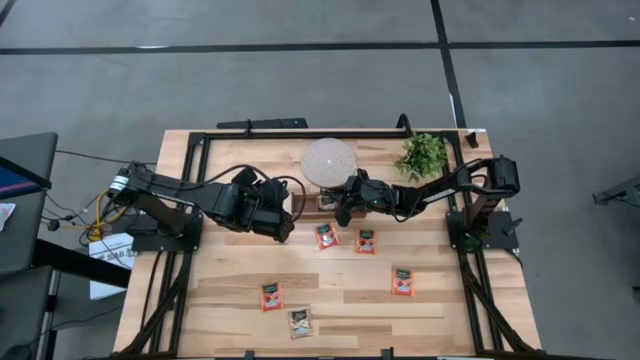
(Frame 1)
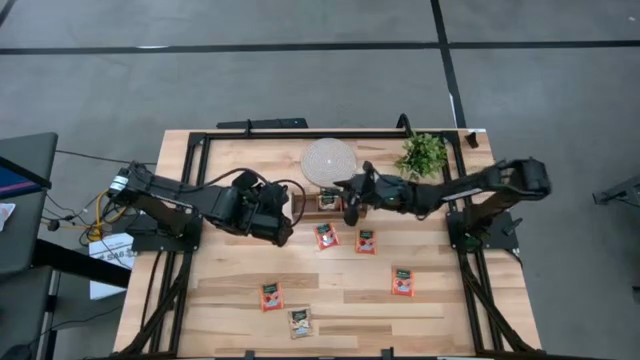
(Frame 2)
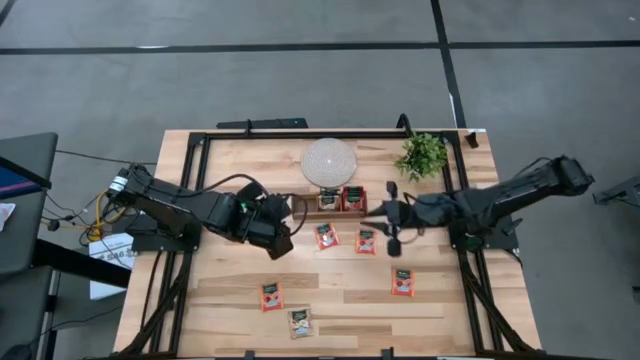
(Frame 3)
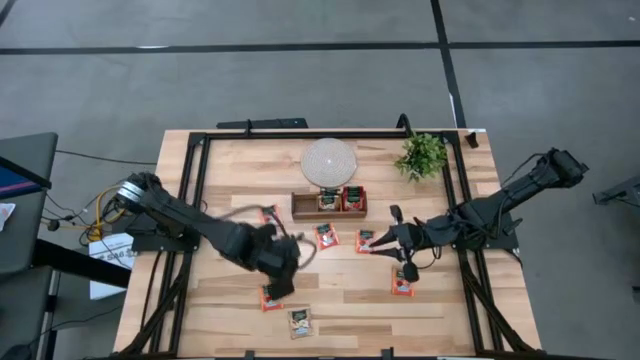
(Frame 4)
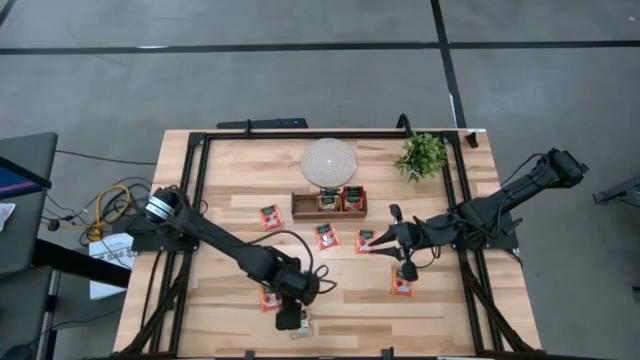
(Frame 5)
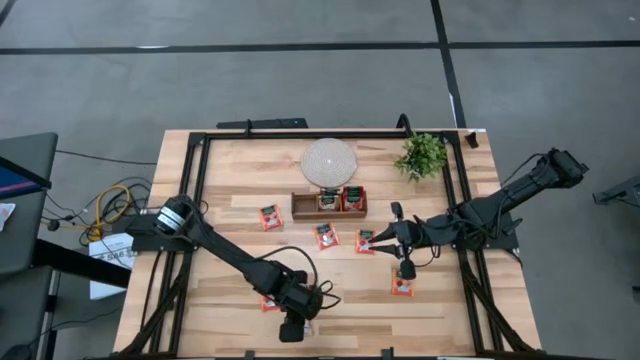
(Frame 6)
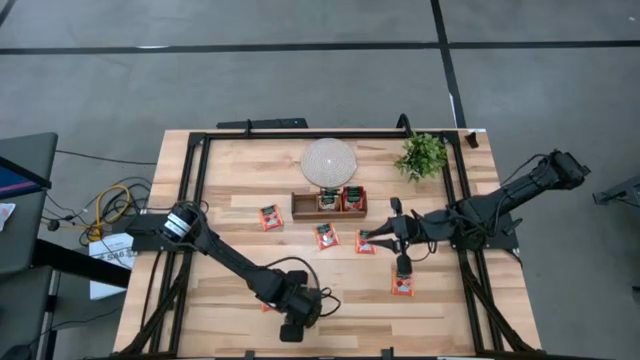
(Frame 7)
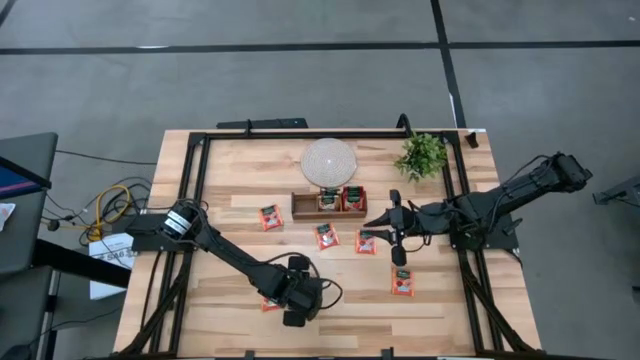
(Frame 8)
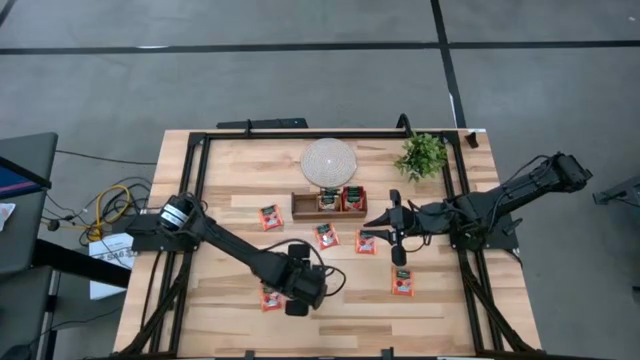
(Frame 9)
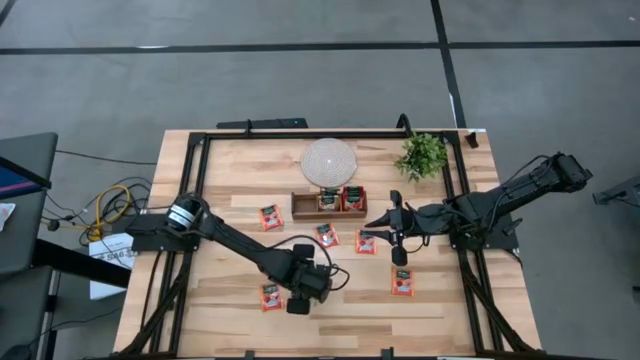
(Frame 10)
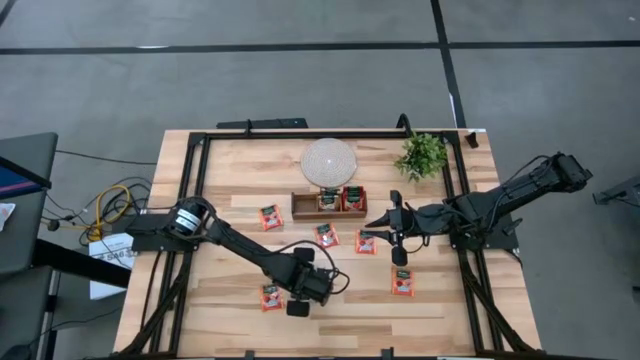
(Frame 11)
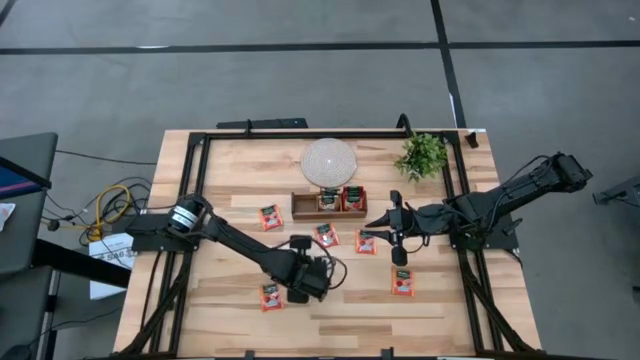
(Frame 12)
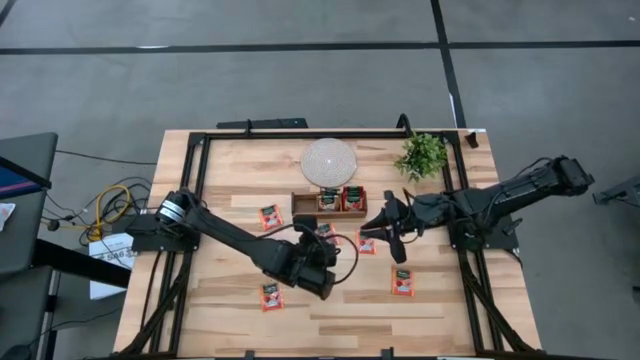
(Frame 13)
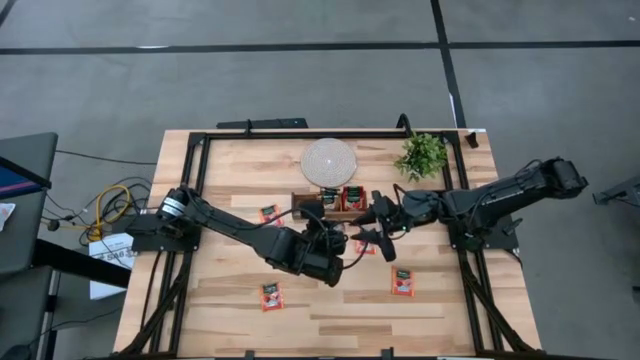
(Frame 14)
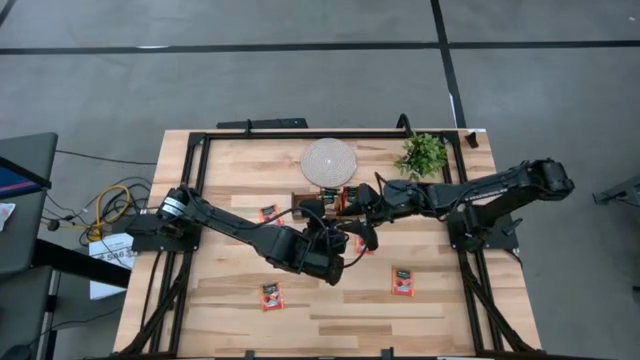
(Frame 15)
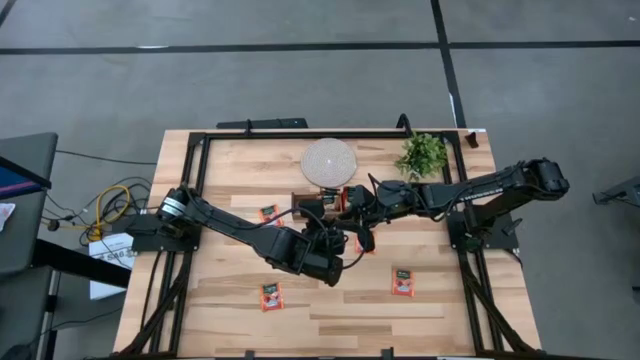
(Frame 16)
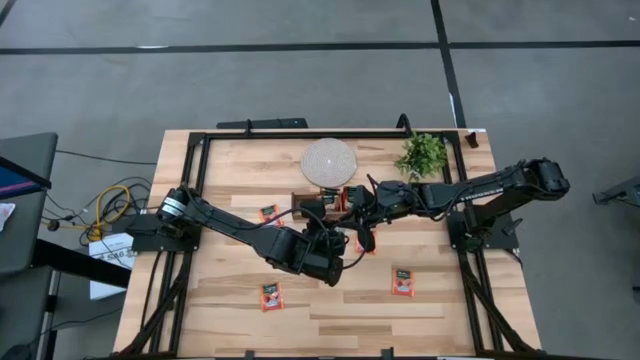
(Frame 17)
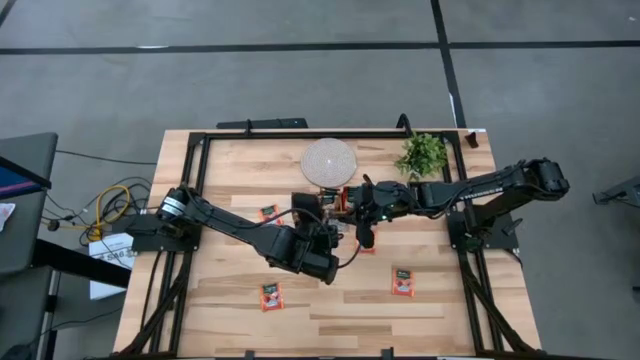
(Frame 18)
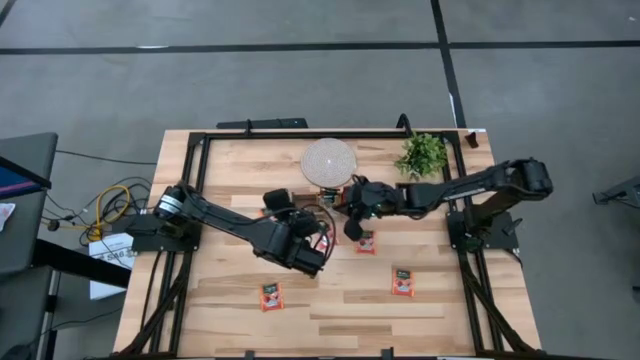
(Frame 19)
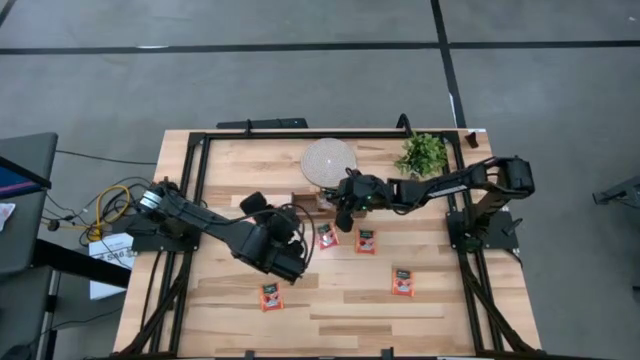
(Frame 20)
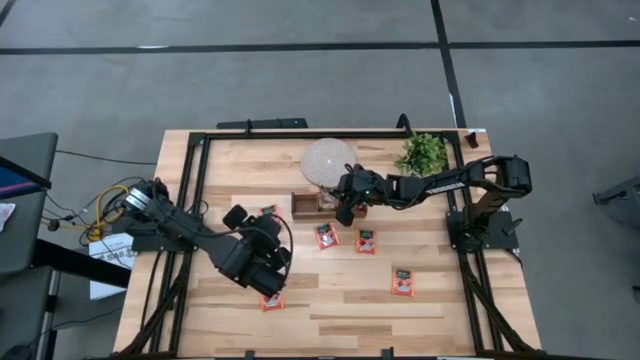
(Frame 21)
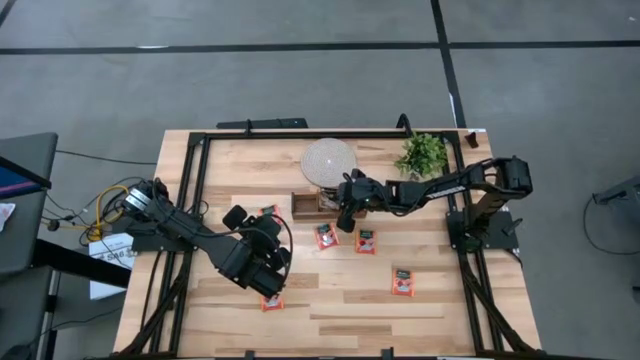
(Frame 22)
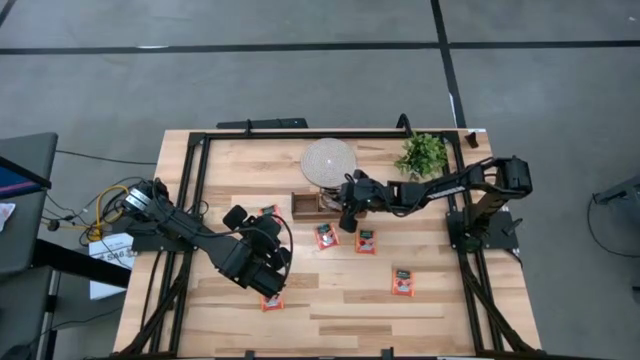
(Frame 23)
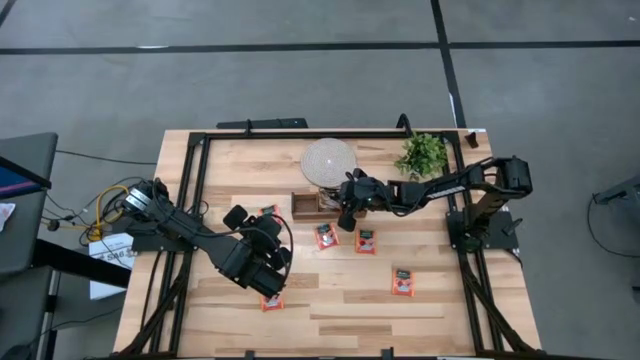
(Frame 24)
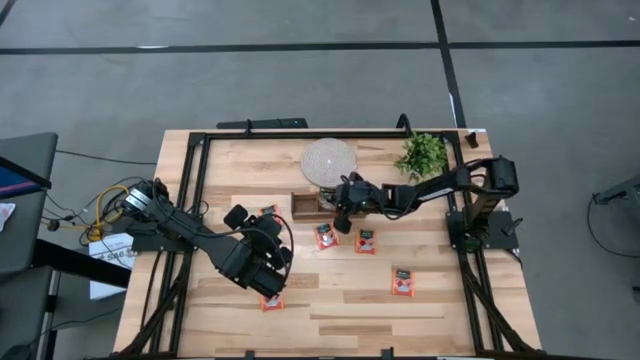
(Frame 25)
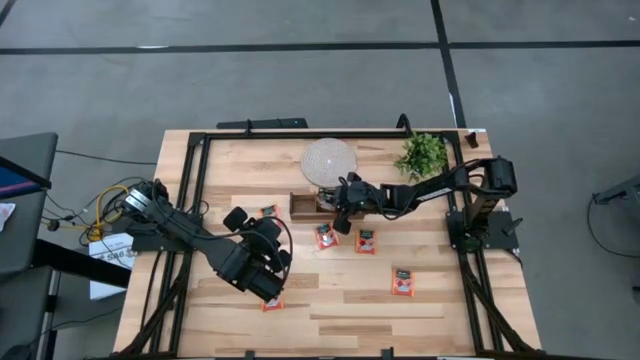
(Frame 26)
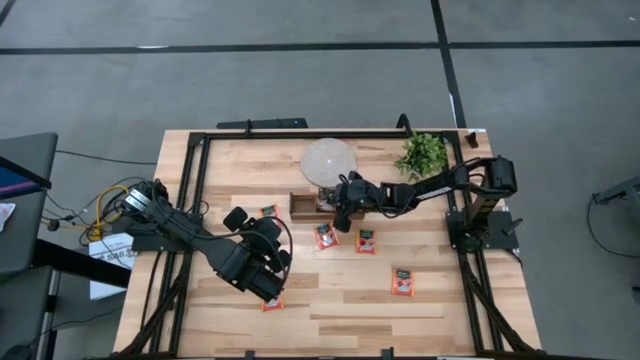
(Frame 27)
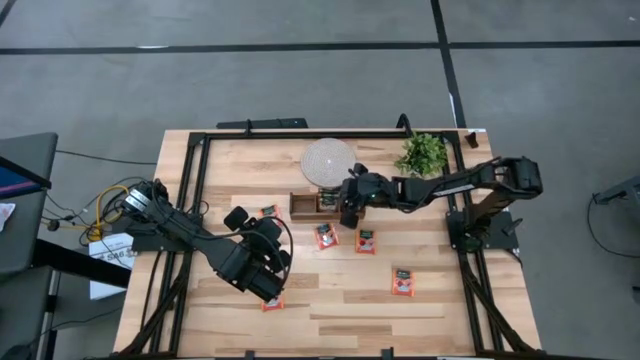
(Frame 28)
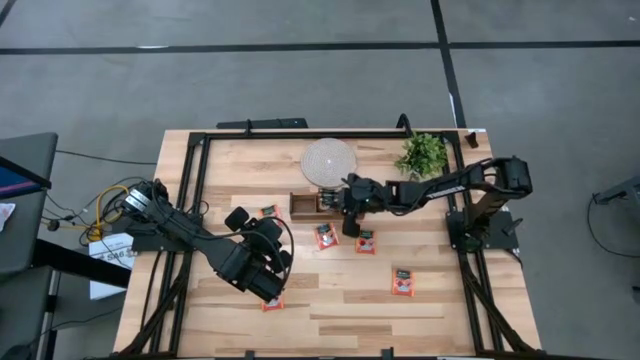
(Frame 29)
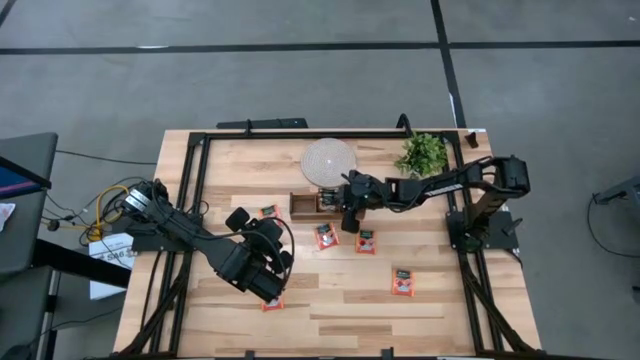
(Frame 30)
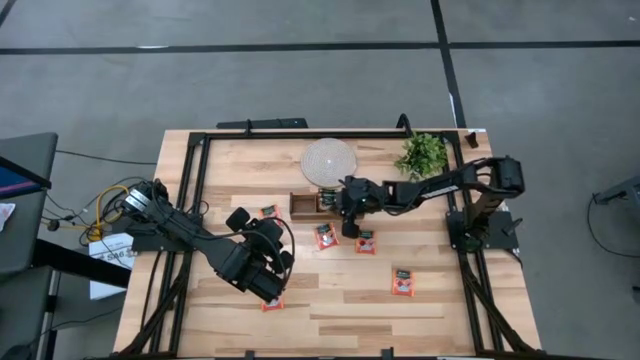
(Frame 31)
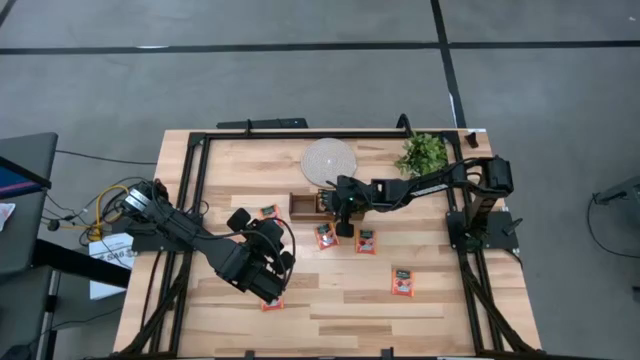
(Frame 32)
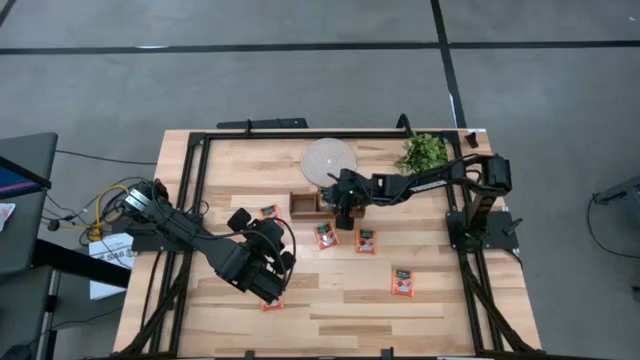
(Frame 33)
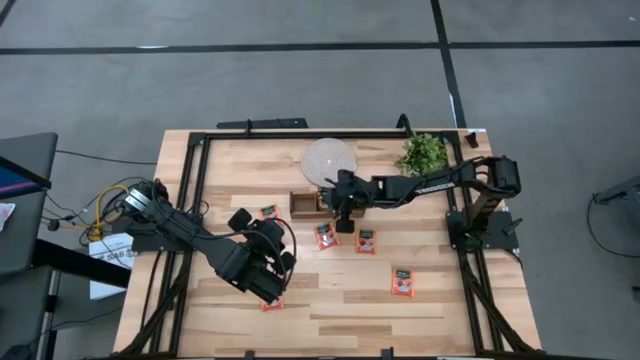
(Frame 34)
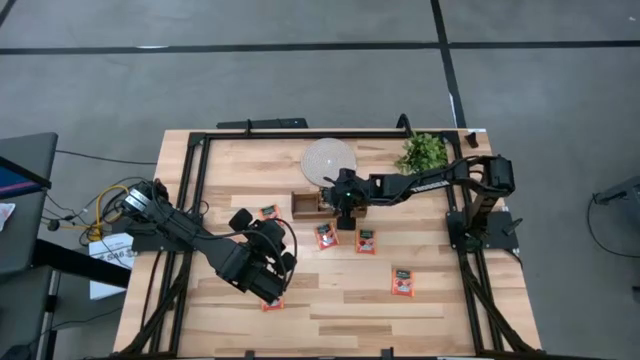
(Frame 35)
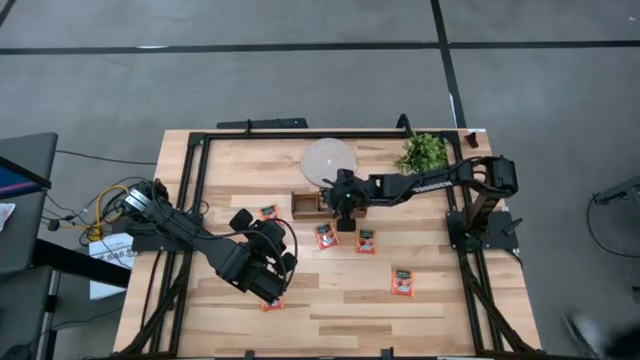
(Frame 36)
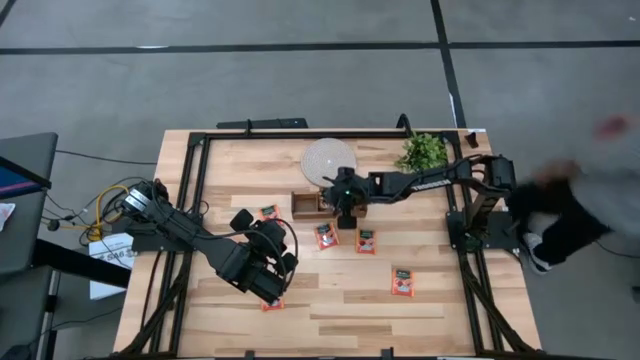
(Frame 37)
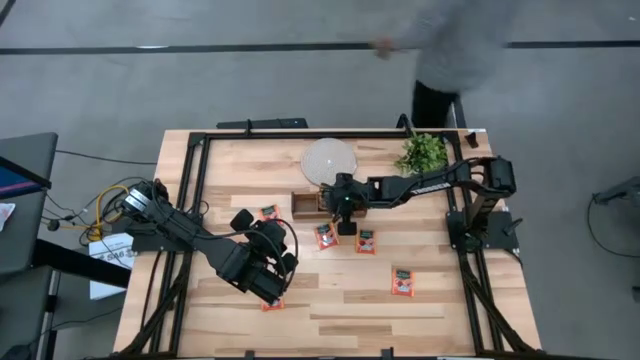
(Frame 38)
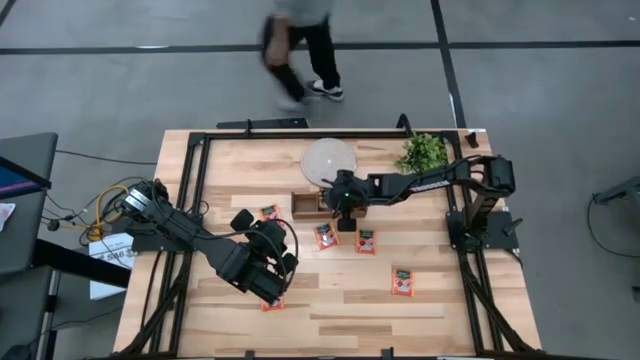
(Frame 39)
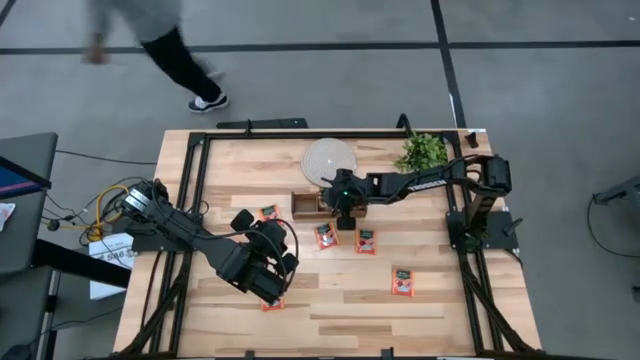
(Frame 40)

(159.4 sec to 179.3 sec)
Task: Pick & Place Tea
Put the brown tea bag into the middle slot of the wooden organizer

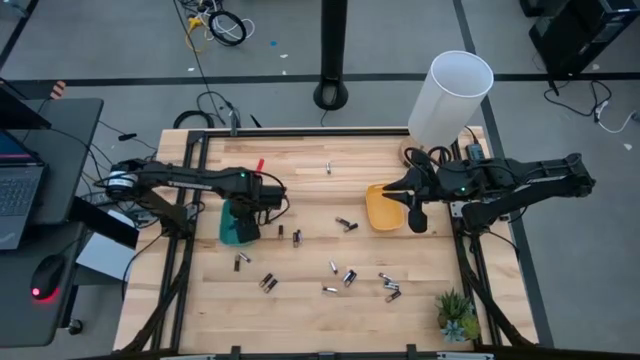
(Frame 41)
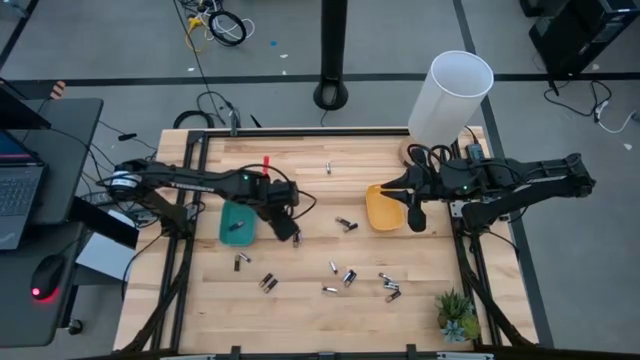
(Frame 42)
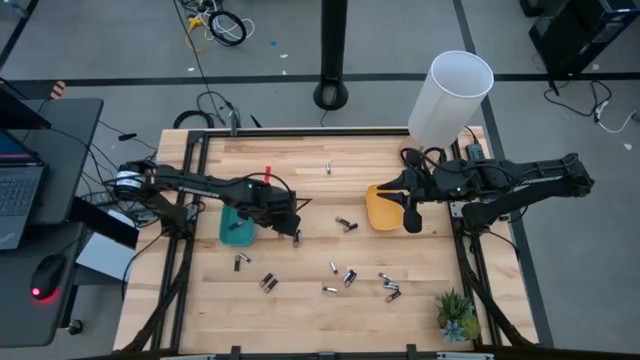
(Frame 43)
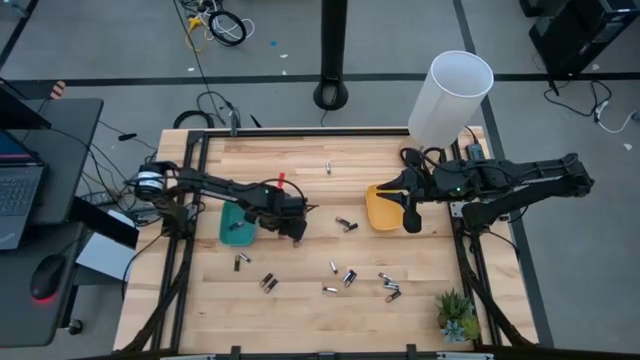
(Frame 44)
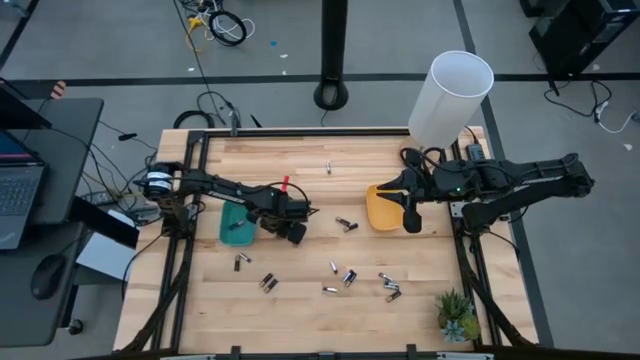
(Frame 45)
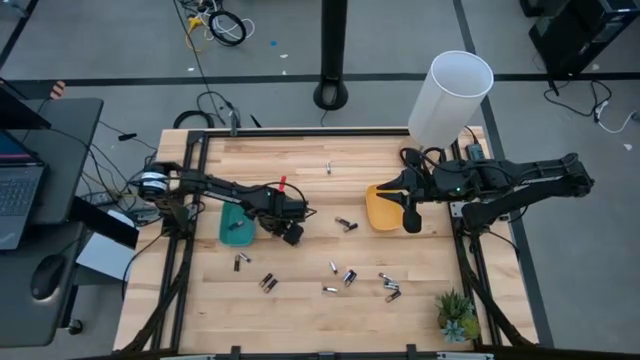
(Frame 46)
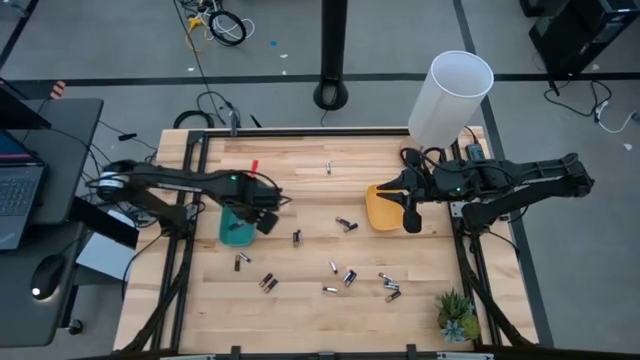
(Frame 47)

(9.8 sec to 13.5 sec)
Task: Sort batteries
Put the black battery into the green bin
